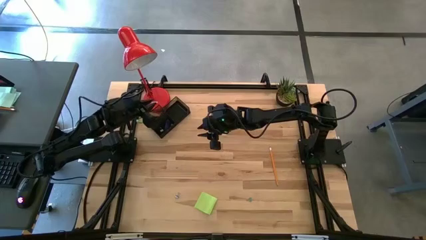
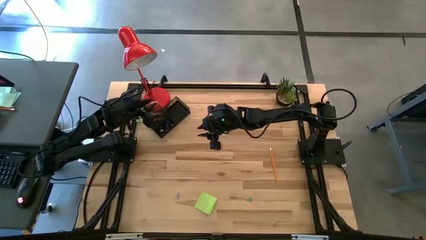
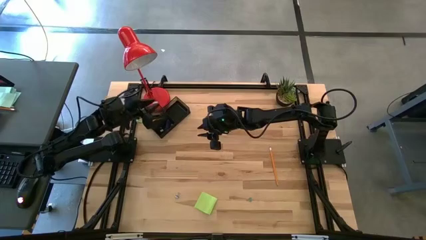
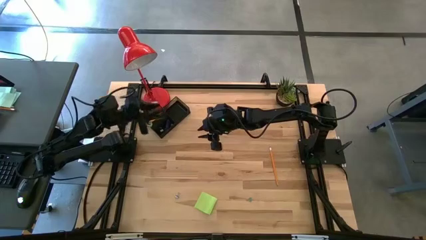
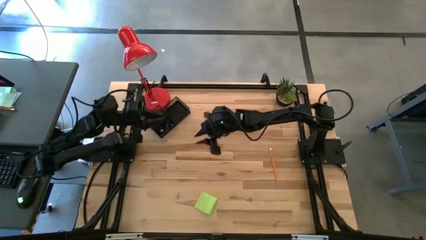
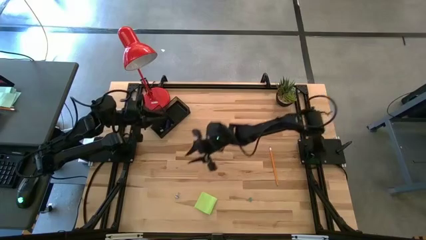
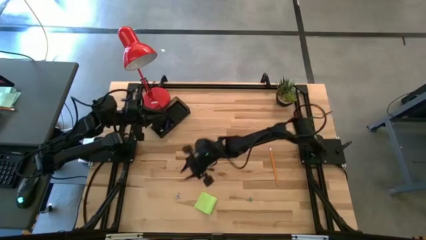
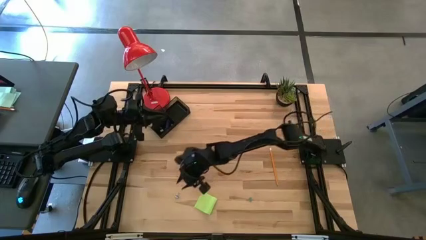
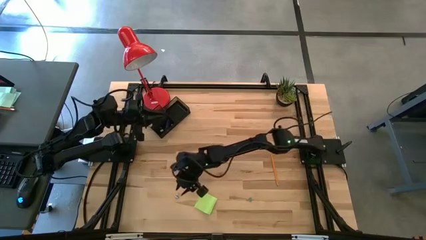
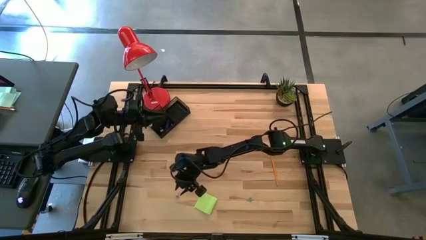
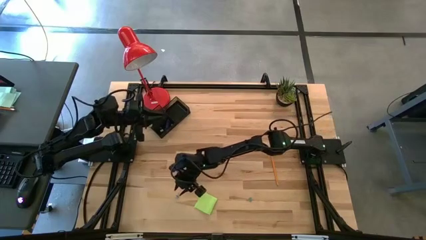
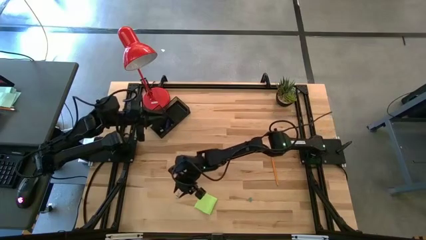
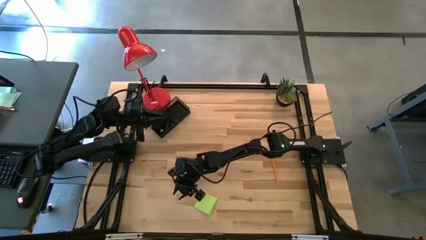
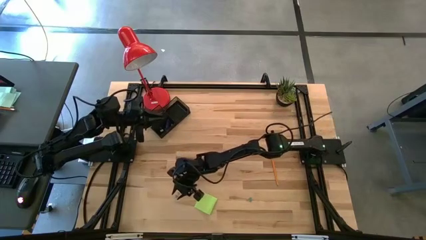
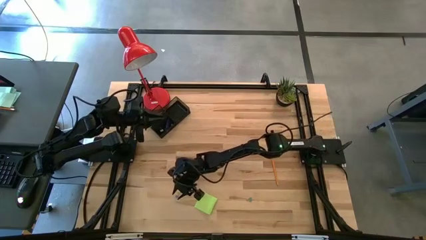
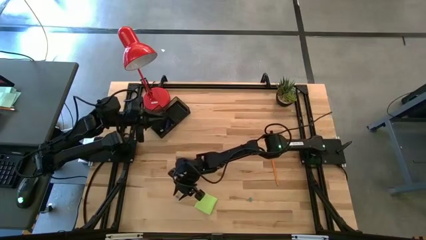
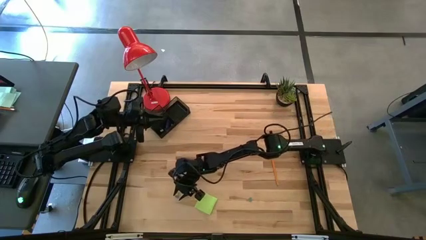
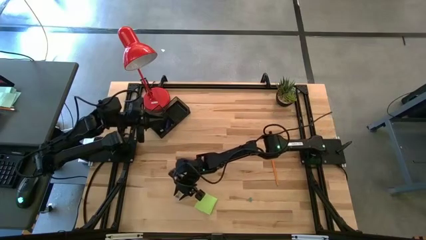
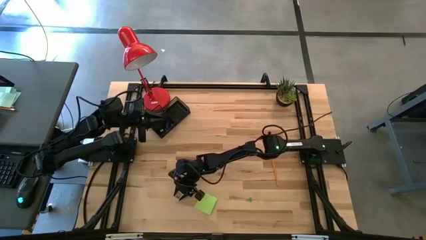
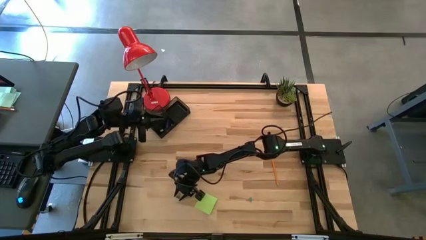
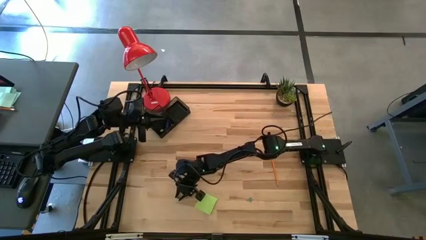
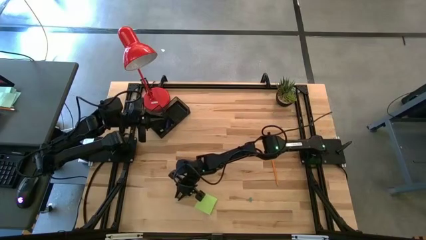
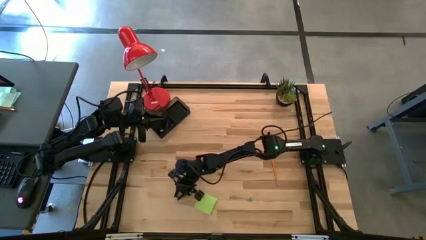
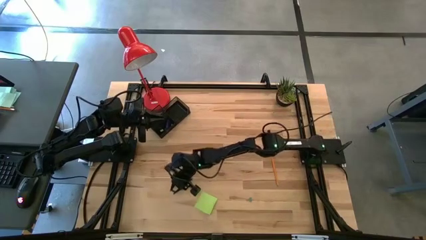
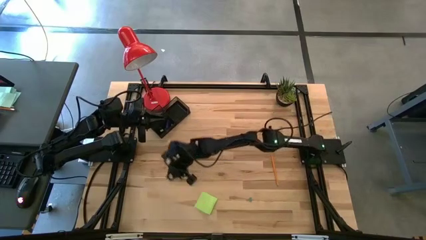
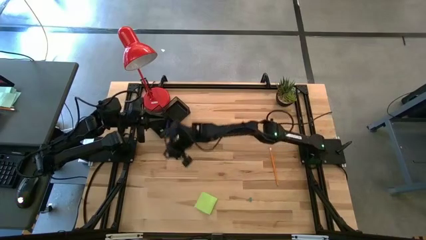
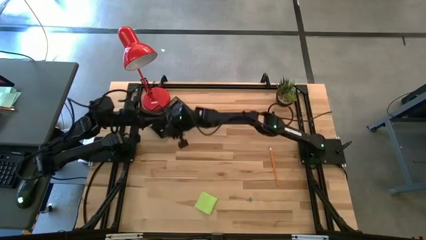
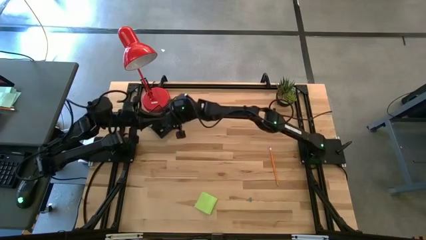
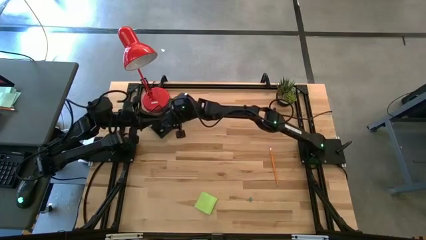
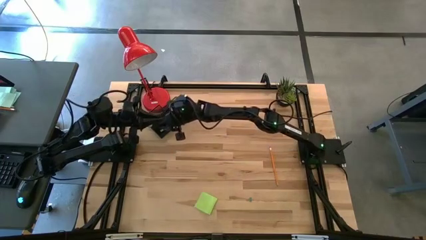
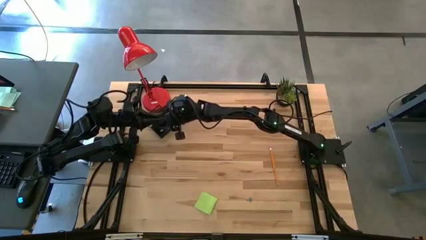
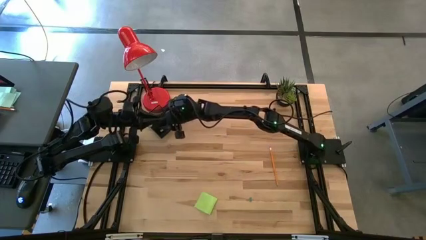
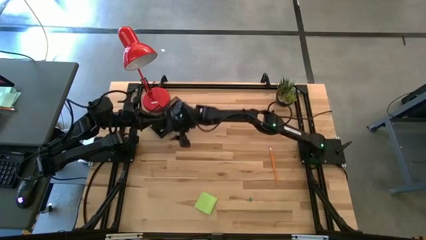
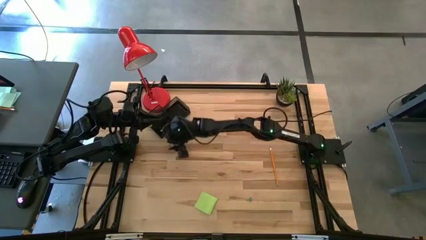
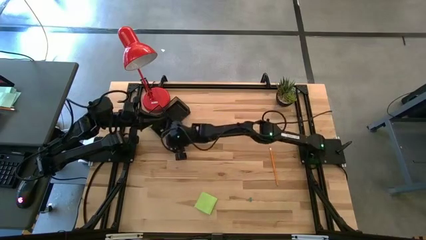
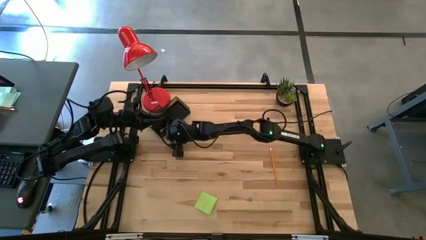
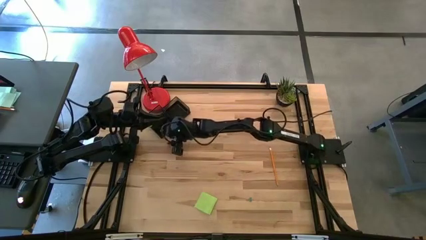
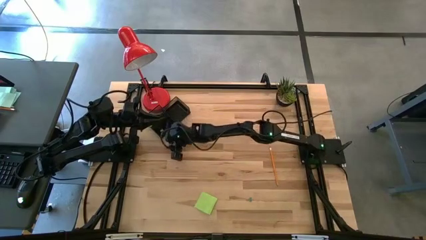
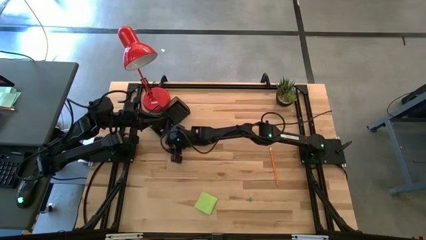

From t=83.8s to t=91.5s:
Task: Pick and place office supplies into organizer
Put the left blue binder clip into the desk organizer

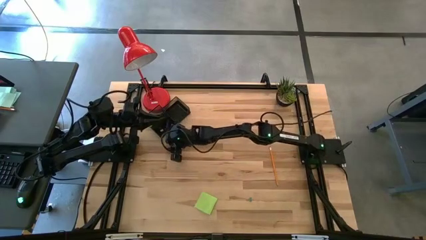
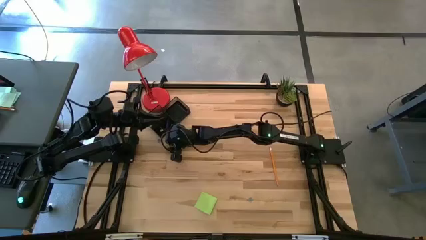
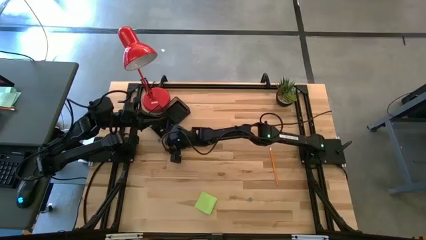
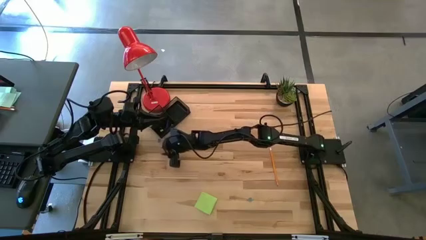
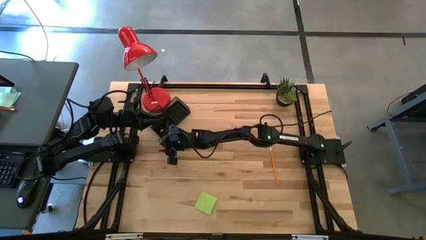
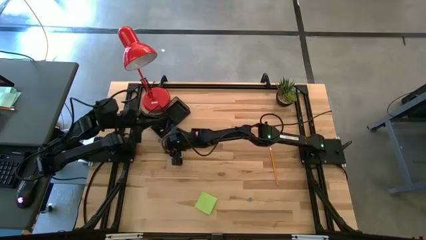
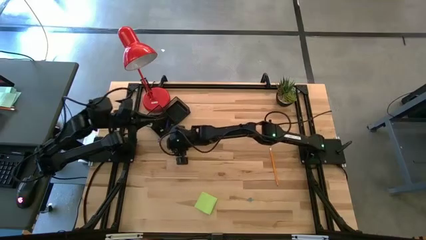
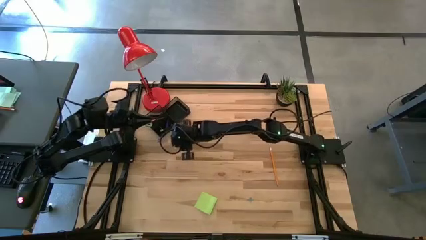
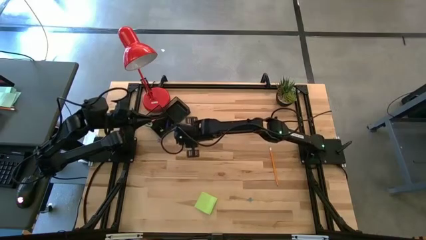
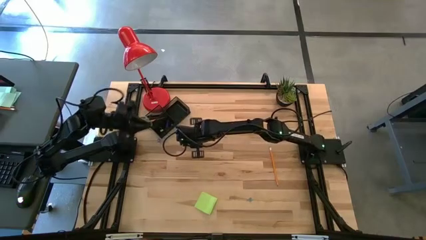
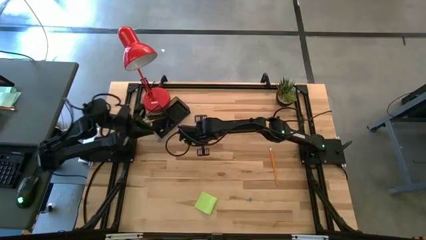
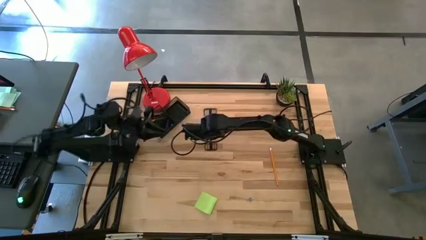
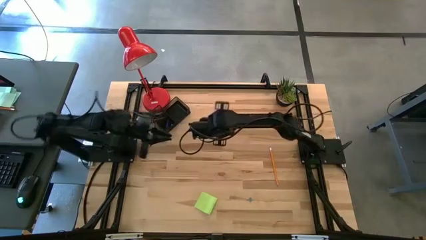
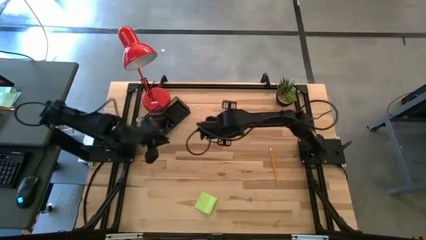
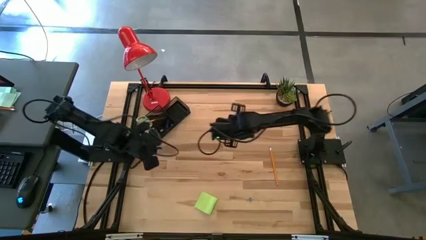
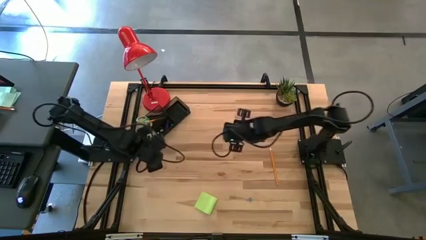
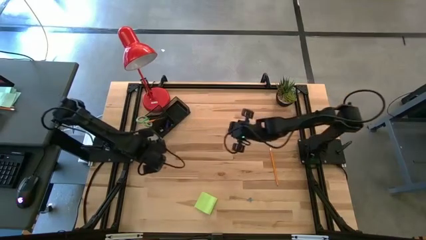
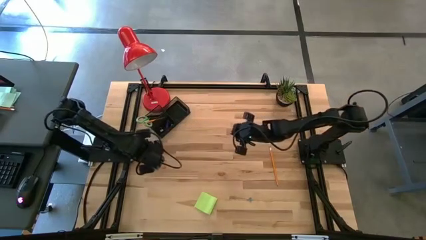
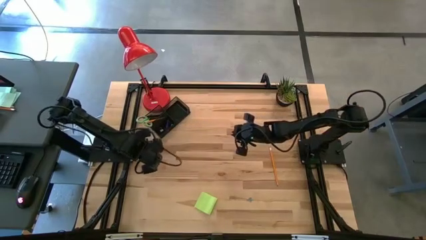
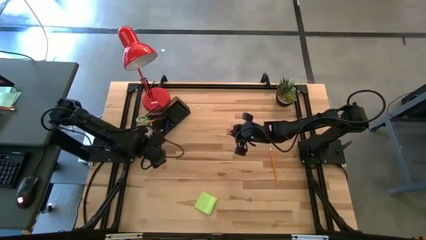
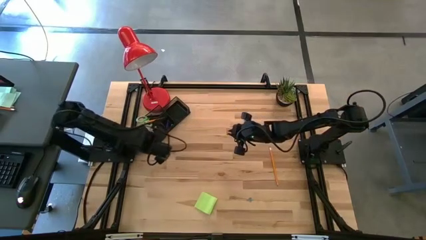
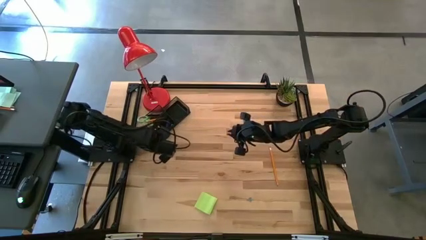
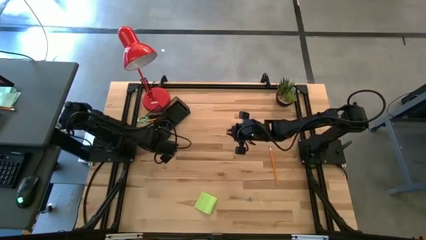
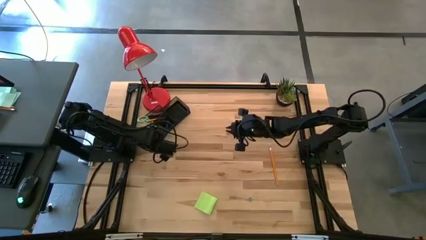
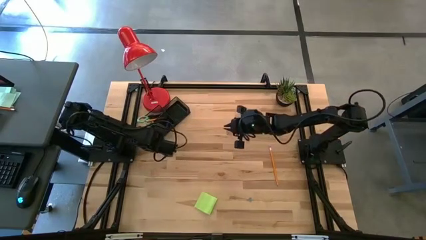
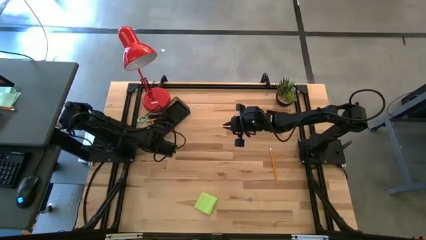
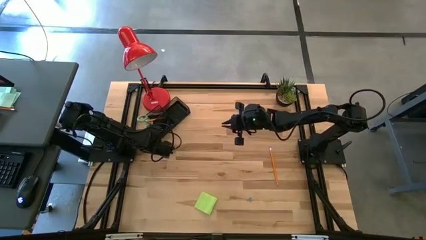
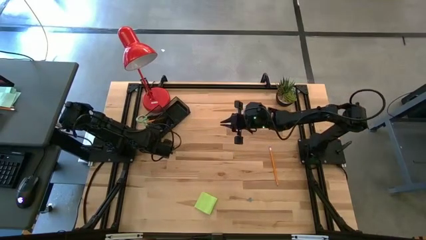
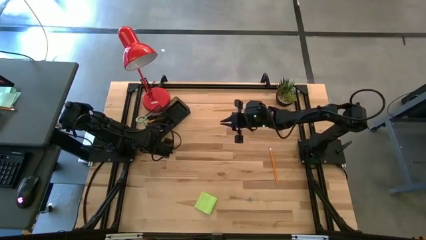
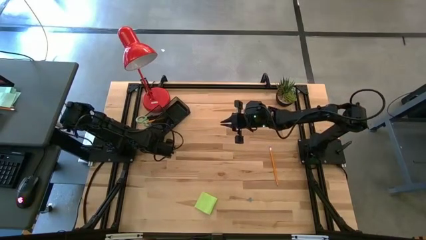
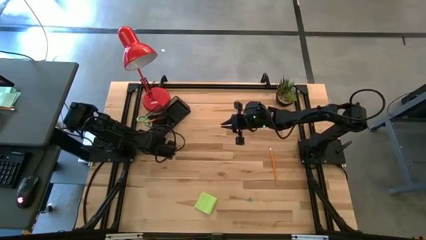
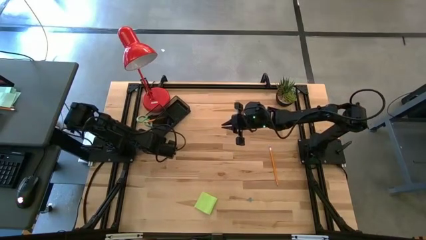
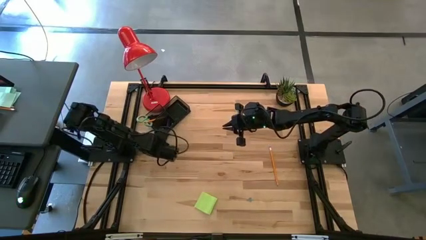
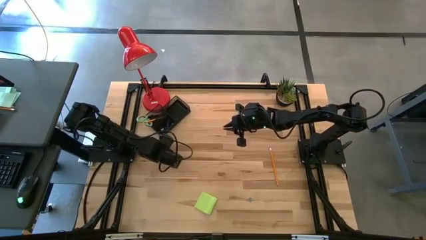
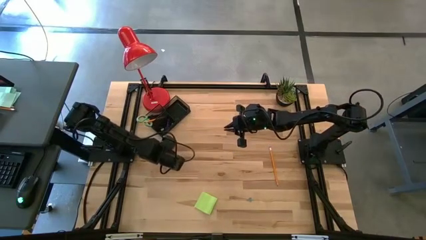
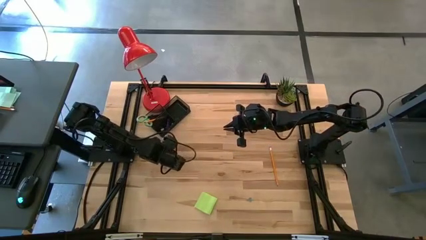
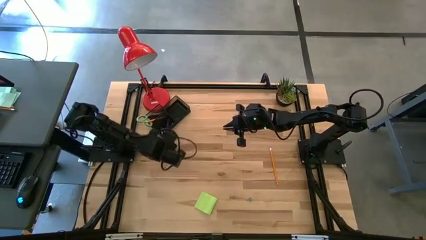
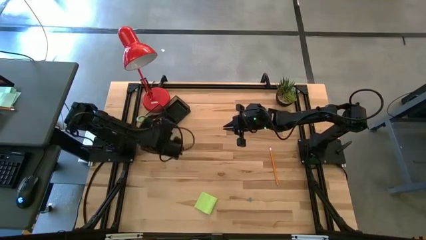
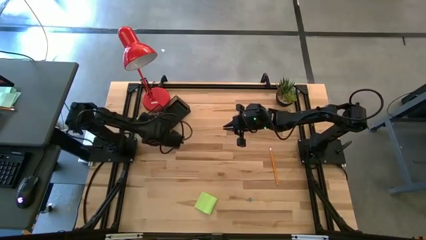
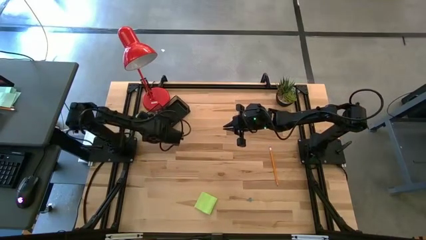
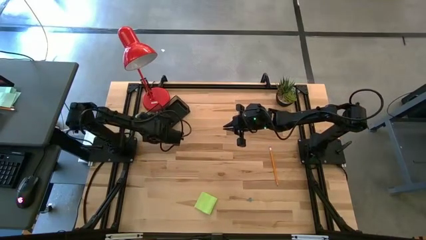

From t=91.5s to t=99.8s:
Put the top blue binder clip into the desk organizer

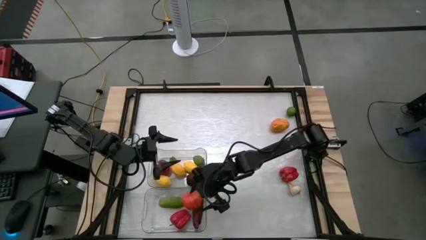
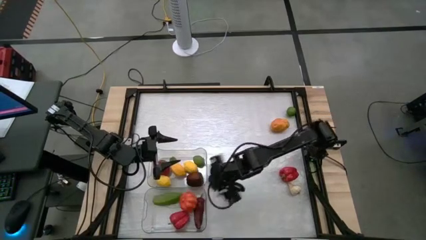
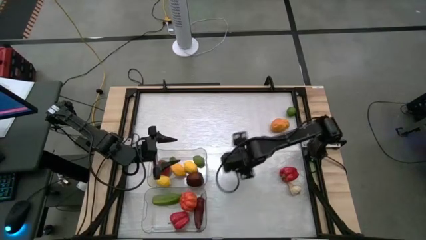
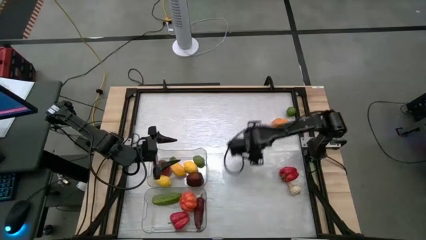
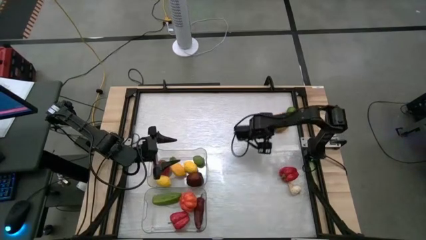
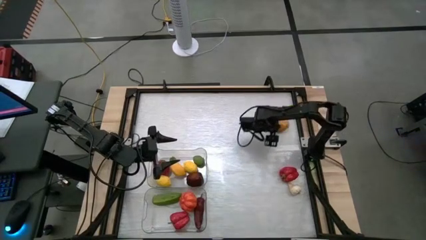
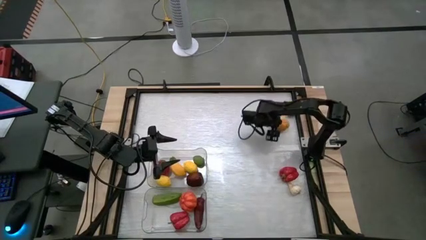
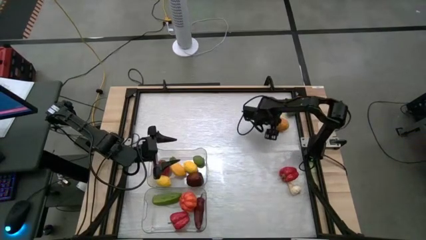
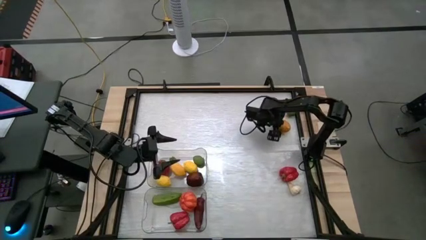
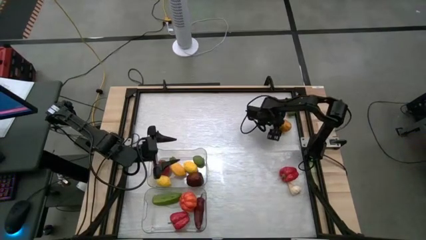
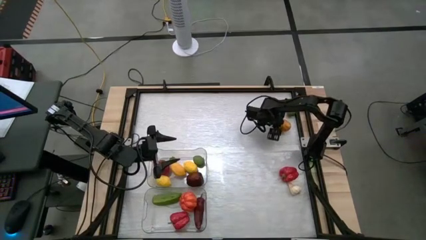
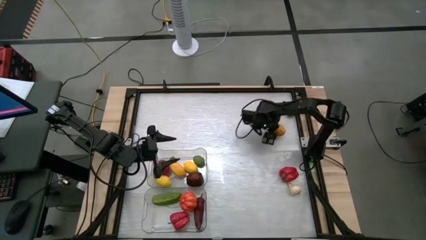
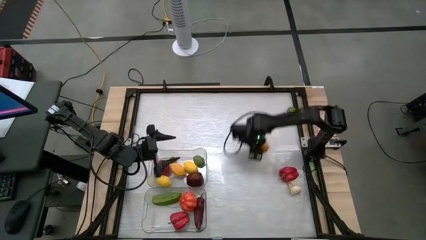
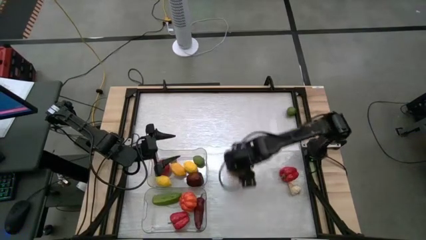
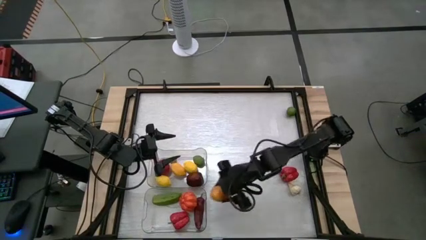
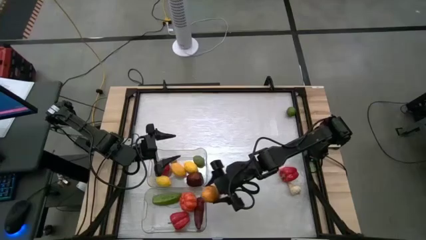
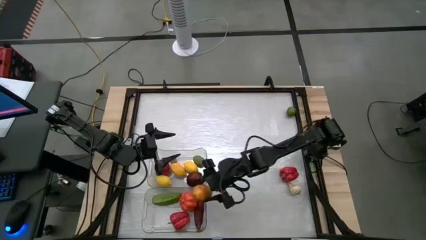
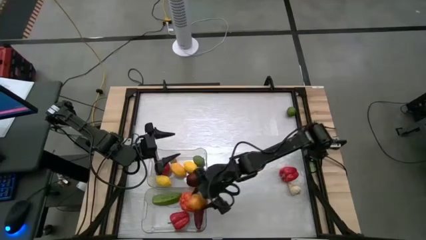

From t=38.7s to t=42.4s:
Task: Sort produce into baskets
Put the potato into the bottom transparent bin
